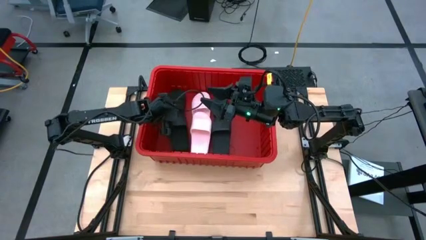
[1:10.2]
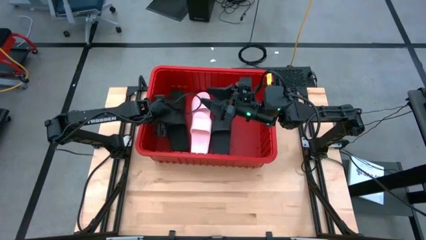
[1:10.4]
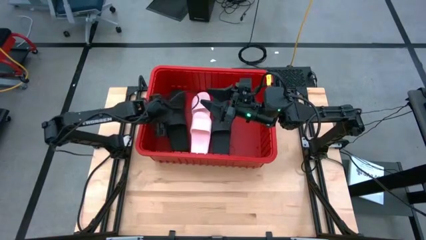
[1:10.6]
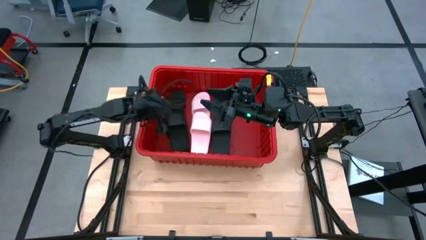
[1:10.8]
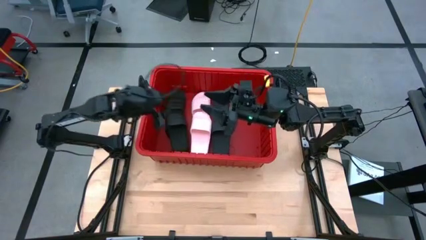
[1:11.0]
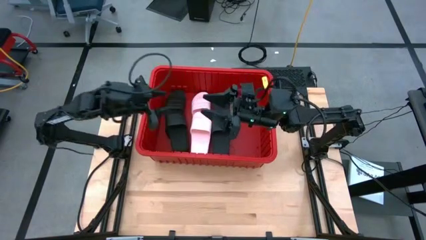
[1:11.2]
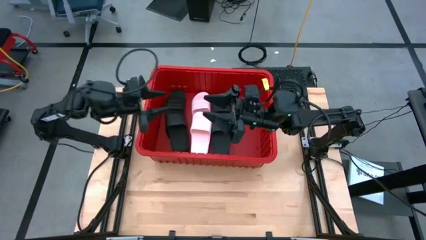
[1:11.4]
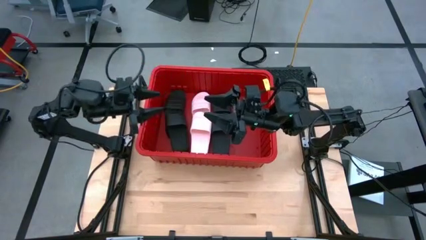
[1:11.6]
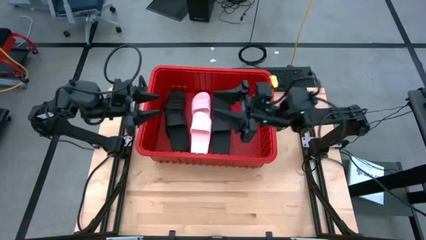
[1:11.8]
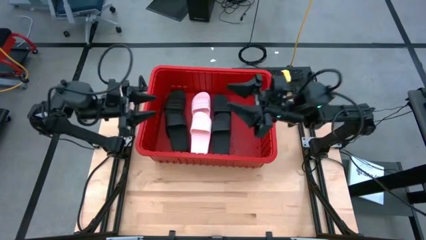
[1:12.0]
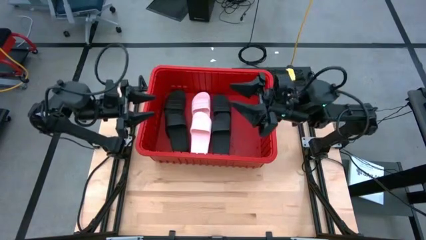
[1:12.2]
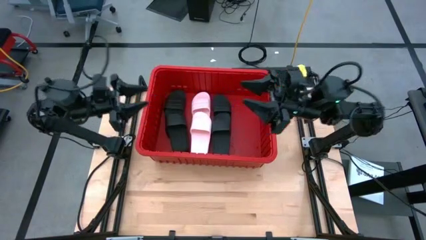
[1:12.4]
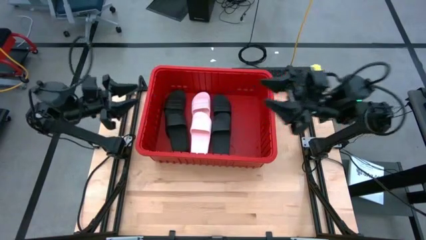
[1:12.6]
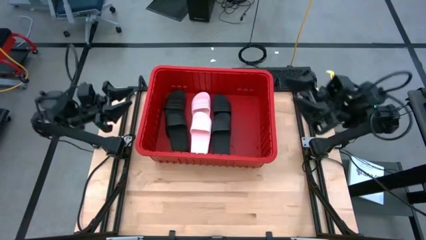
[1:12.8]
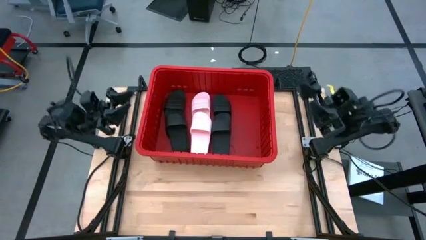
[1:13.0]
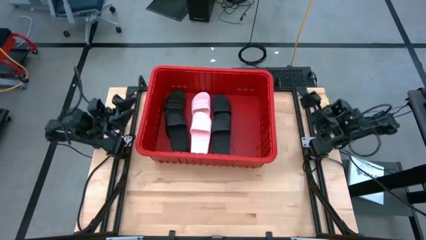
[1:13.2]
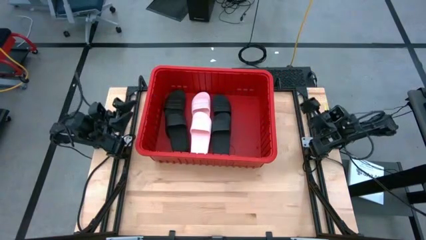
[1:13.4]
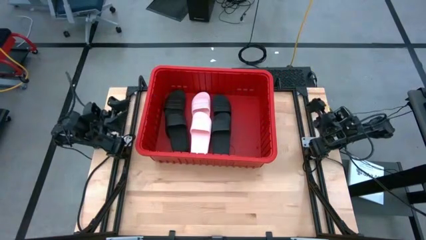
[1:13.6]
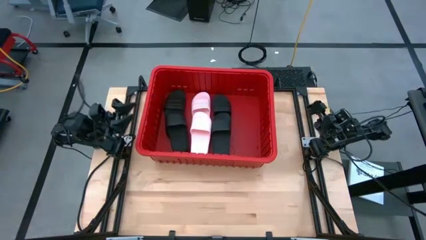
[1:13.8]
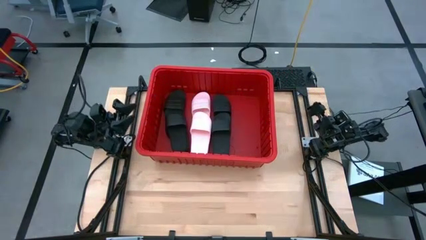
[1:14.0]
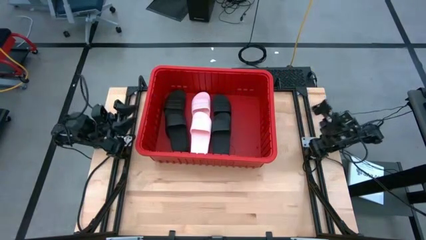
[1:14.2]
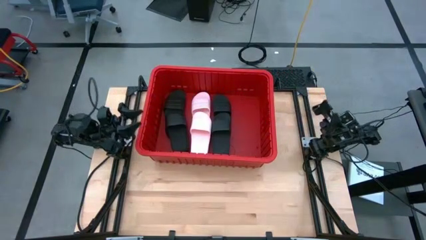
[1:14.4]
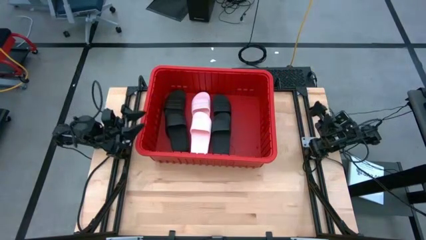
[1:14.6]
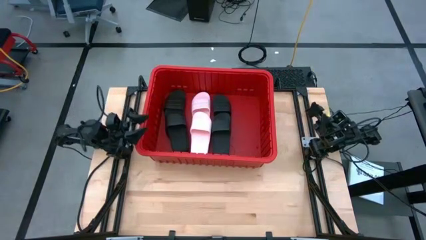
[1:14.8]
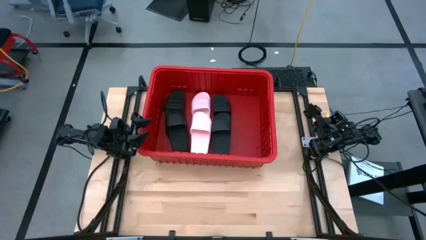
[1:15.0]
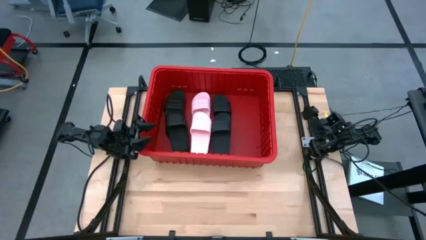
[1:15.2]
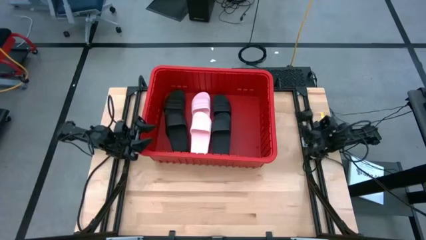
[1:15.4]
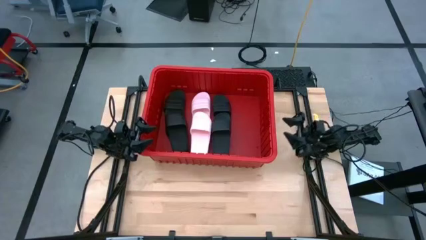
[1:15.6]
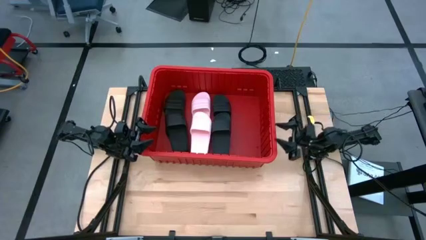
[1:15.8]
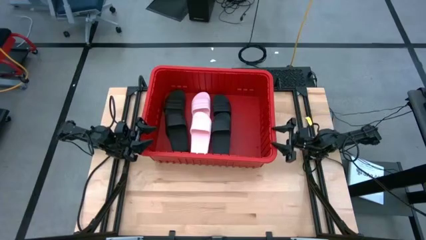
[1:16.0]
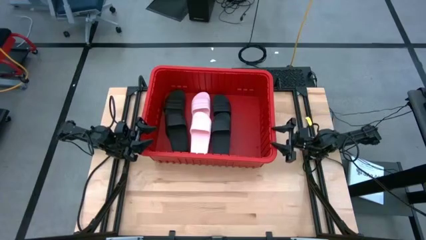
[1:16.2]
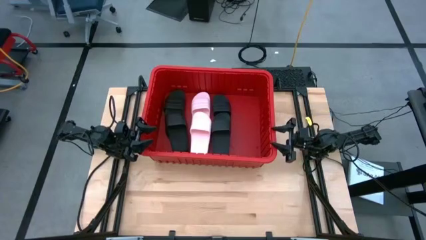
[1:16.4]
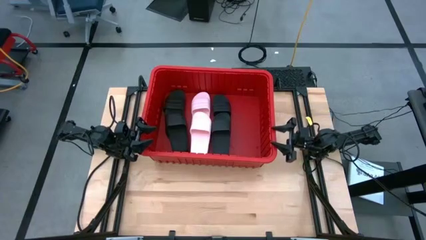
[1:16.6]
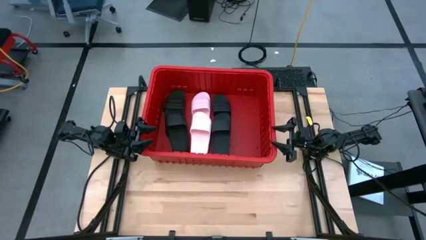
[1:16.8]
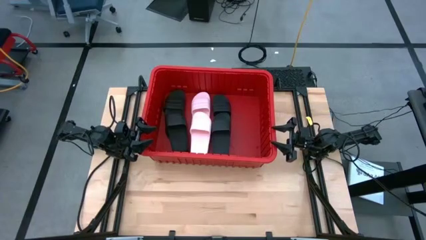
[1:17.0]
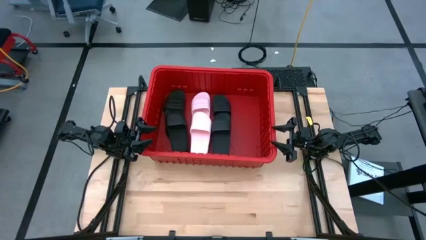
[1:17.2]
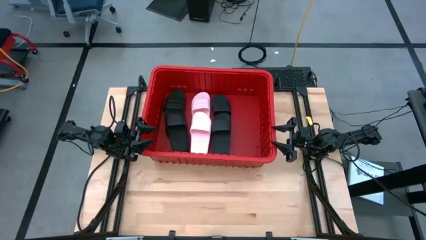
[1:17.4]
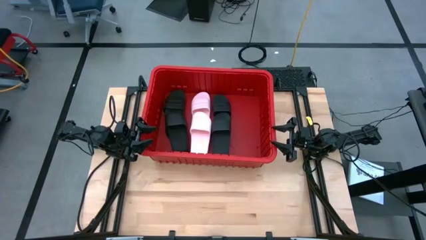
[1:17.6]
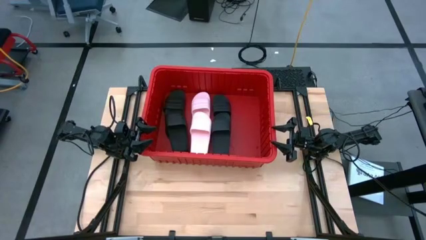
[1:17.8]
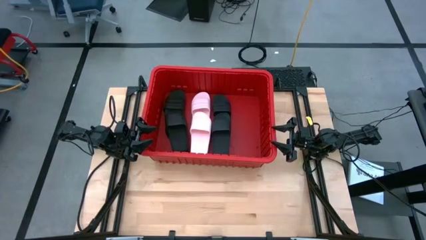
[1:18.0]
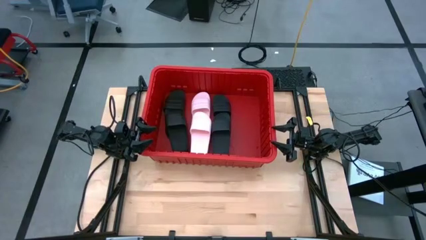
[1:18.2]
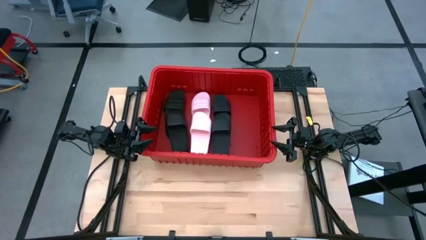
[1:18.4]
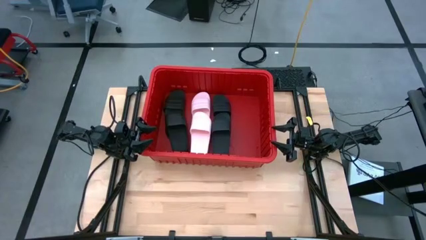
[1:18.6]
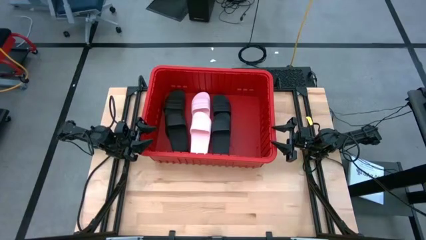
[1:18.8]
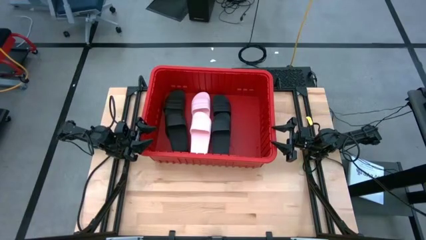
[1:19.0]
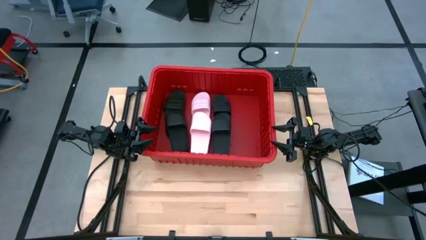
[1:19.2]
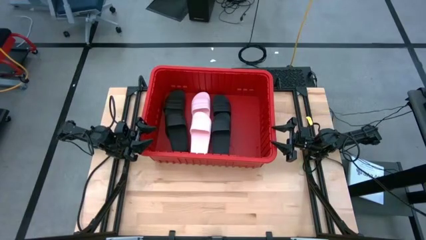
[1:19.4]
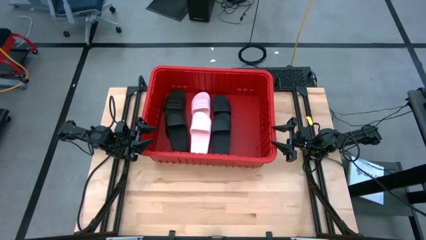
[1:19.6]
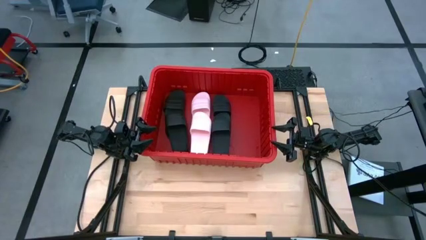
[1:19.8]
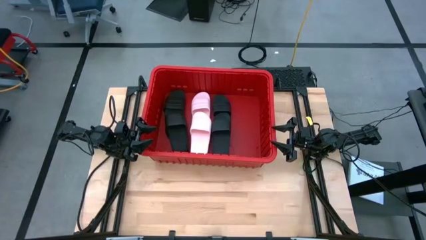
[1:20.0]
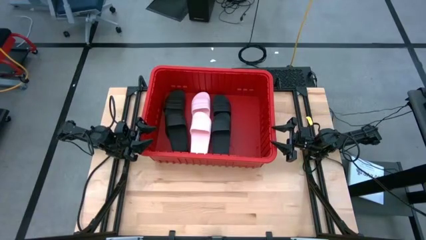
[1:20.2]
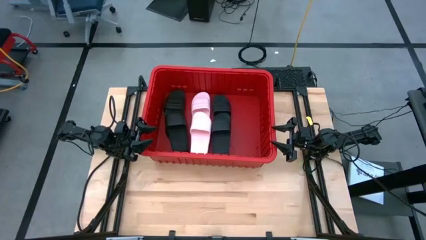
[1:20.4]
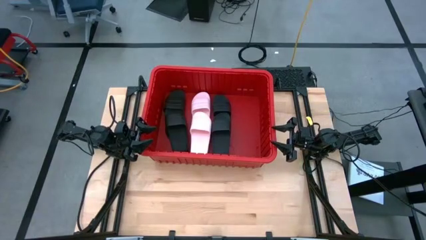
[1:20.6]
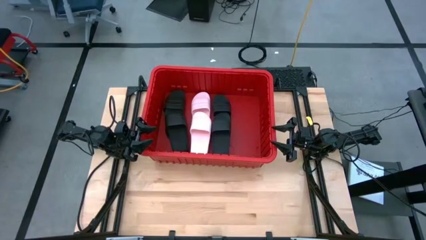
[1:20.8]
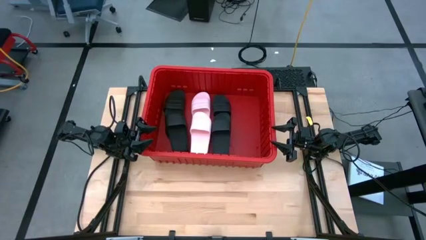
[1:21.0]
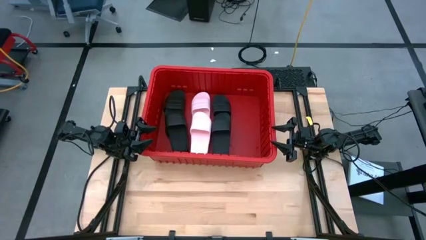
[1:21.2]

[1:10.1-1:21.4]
Task: Pick and place slides into bin
Return to Home Position

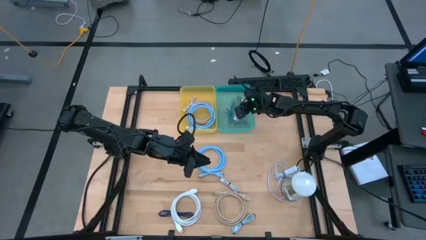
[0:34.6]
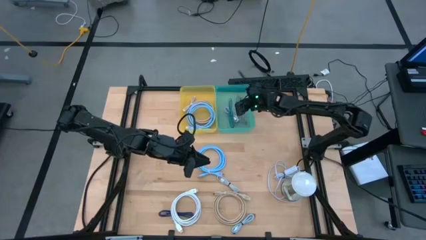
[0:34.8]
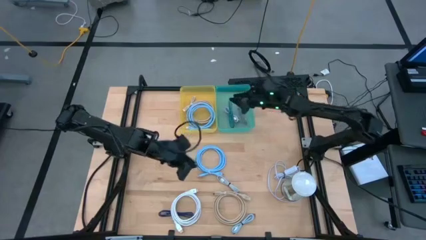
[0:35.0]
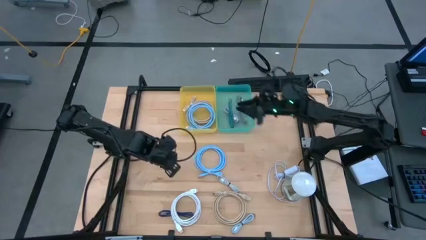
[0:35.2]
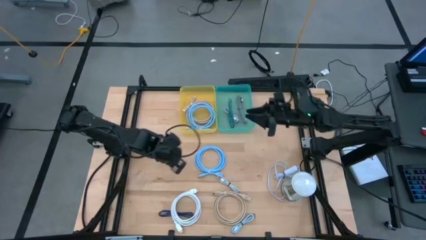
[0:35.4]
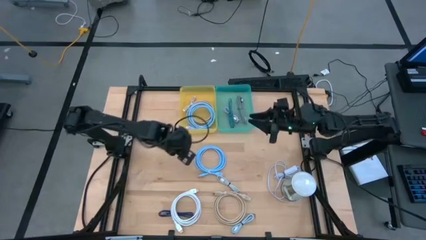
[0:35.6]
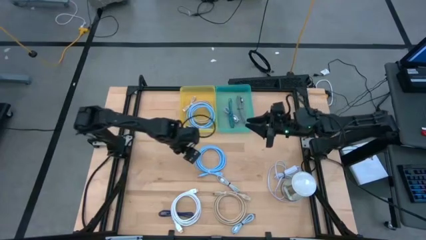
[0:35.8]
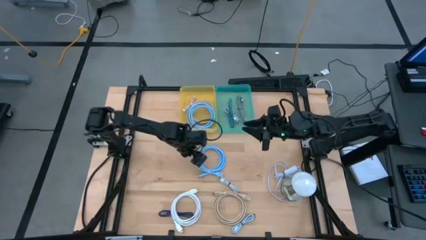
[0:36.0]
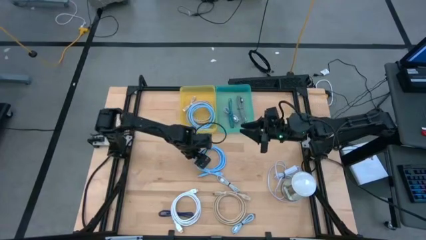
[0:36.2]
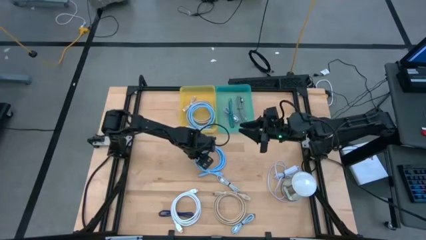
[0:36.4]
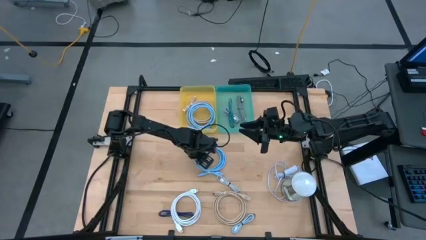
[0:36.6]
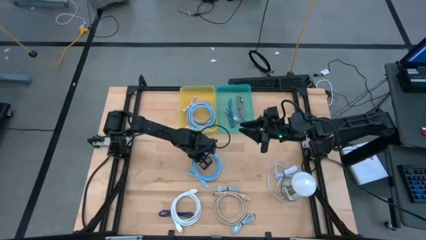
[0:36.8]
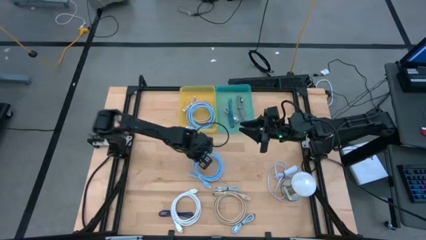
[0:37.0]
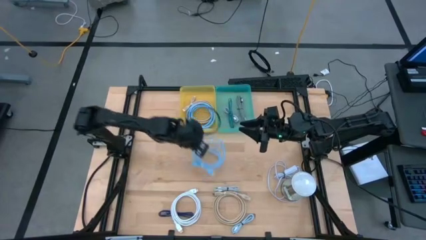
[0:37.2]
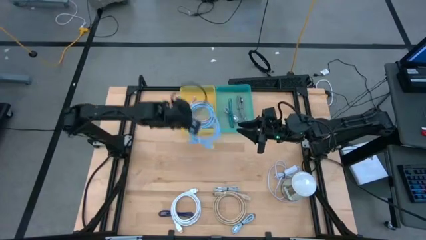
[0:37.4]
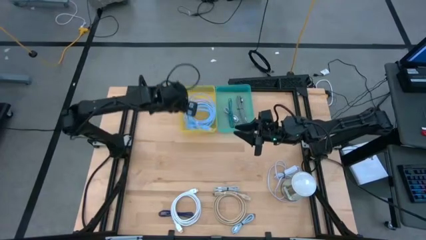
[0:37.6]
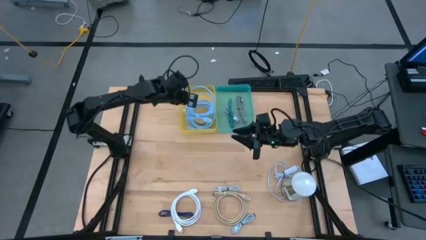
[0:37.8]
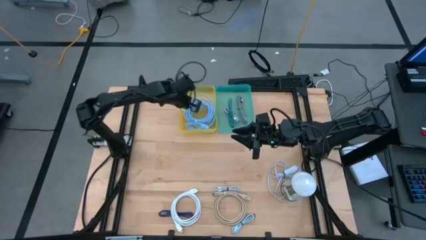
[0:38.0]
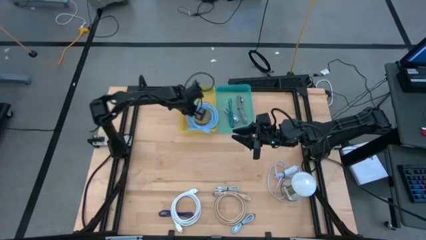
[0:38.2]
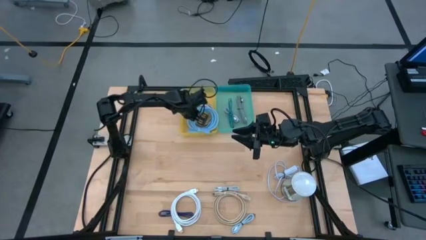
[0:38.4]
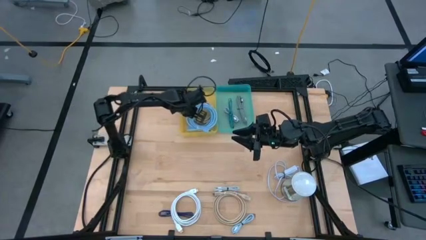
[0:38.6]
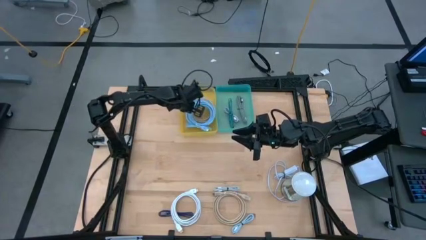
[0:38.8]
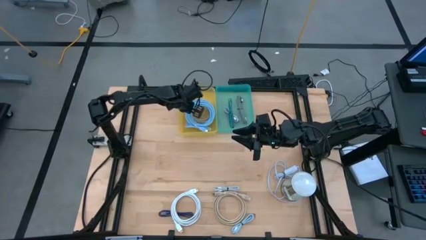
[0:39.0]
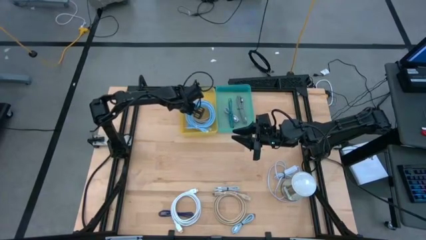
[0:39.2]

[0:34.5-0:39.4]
Task: Pick & Place USB Port
Put the blue HDMI cable into the yellow bin
